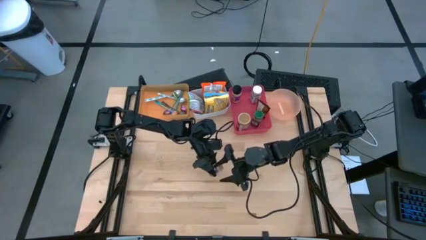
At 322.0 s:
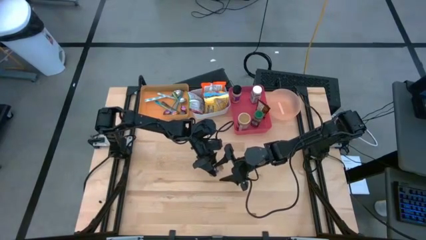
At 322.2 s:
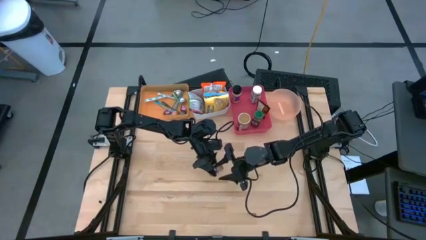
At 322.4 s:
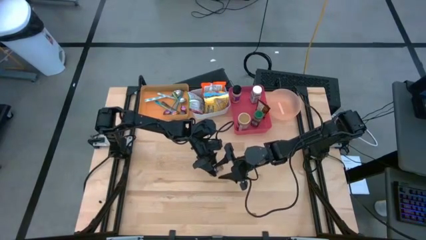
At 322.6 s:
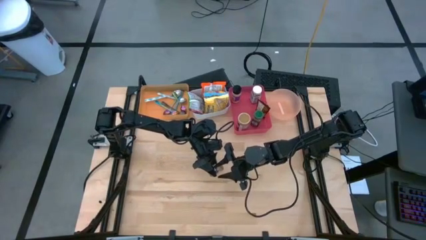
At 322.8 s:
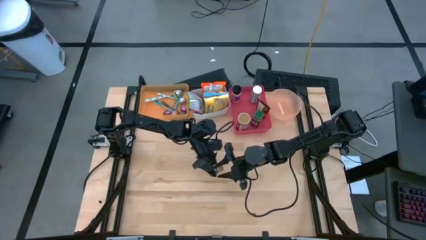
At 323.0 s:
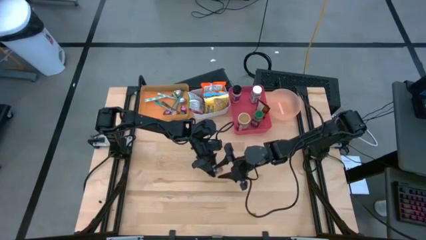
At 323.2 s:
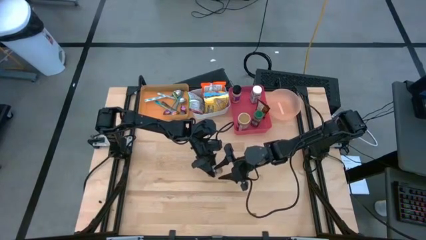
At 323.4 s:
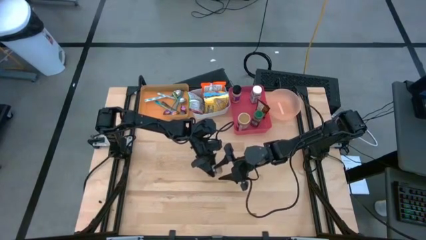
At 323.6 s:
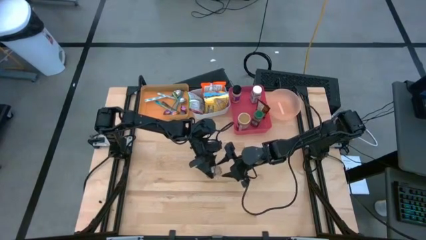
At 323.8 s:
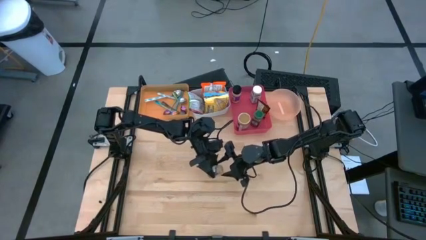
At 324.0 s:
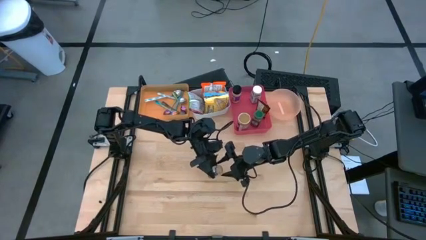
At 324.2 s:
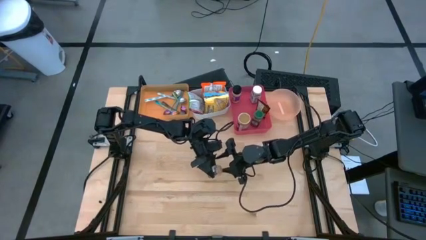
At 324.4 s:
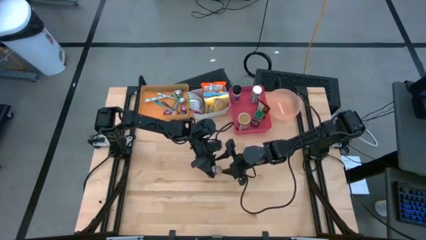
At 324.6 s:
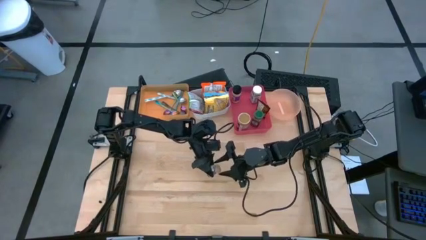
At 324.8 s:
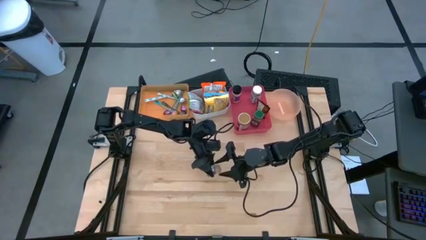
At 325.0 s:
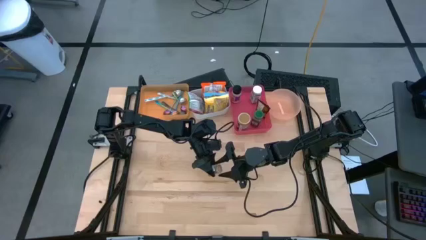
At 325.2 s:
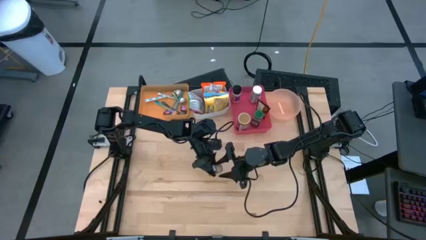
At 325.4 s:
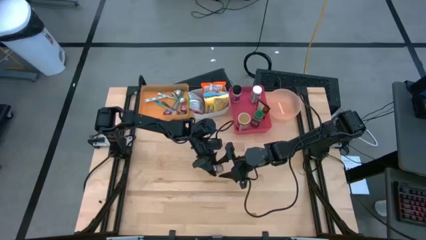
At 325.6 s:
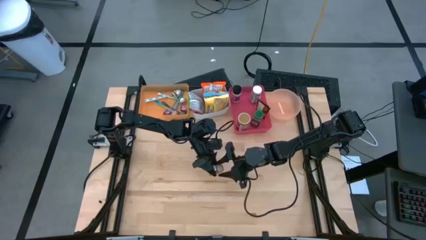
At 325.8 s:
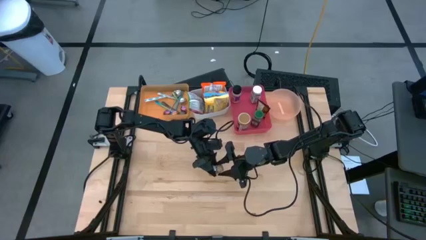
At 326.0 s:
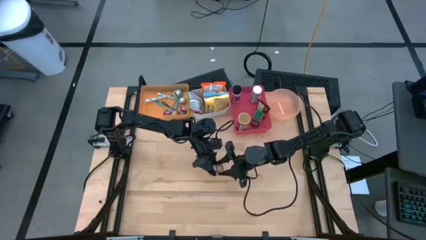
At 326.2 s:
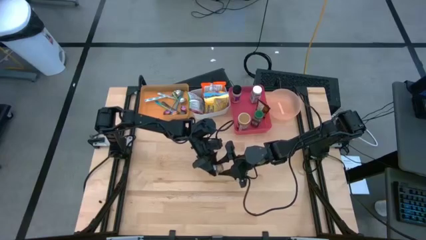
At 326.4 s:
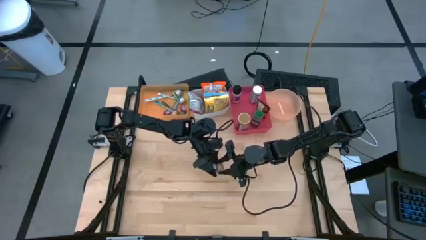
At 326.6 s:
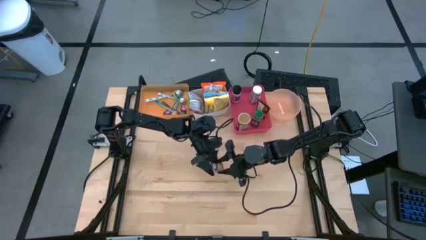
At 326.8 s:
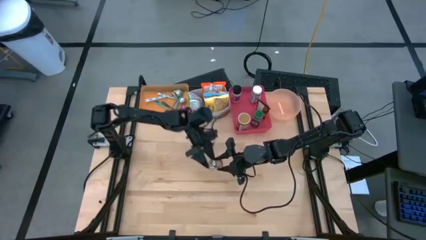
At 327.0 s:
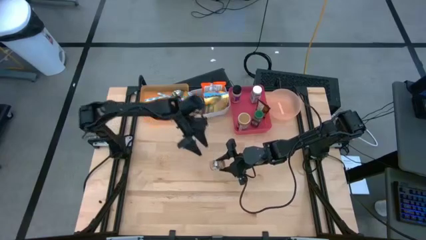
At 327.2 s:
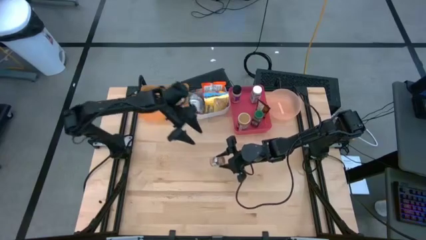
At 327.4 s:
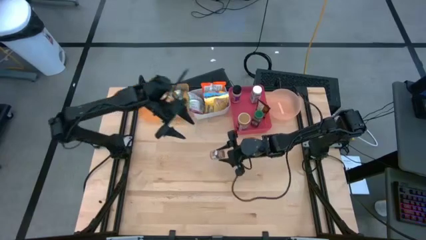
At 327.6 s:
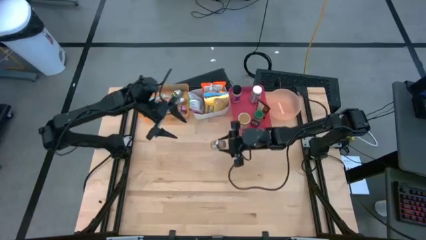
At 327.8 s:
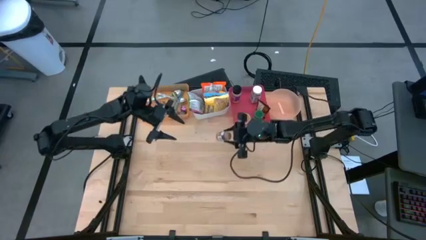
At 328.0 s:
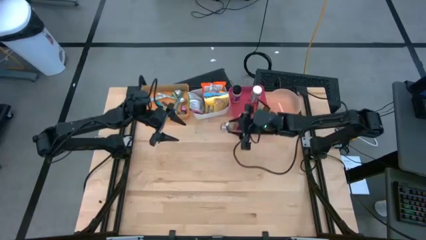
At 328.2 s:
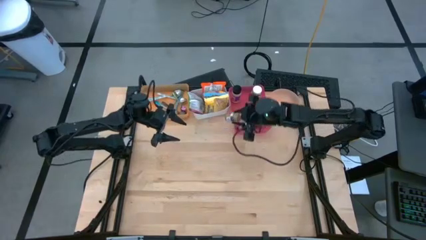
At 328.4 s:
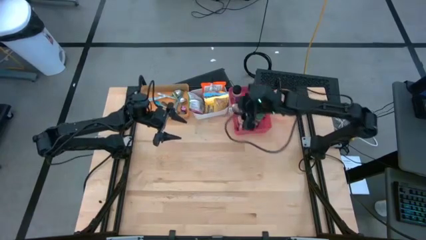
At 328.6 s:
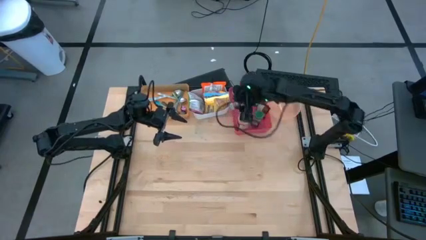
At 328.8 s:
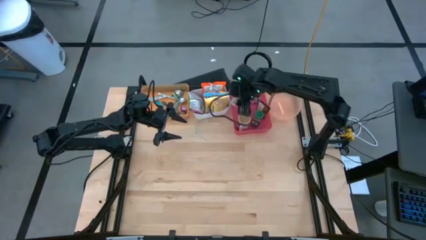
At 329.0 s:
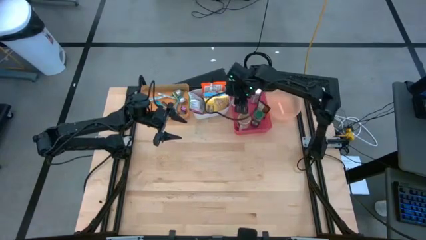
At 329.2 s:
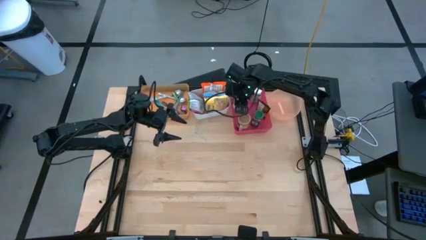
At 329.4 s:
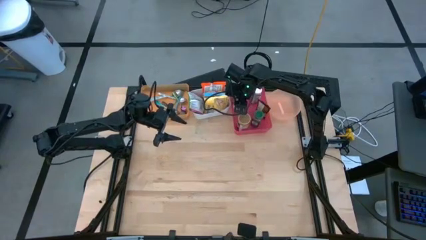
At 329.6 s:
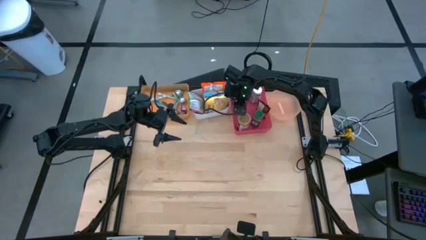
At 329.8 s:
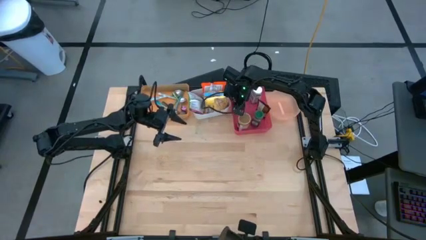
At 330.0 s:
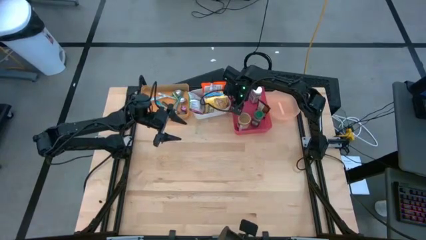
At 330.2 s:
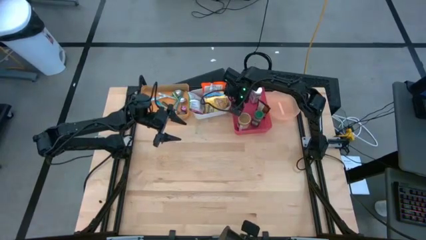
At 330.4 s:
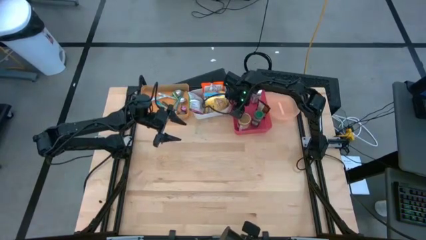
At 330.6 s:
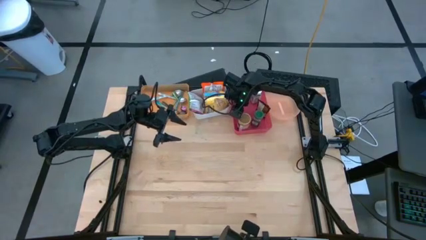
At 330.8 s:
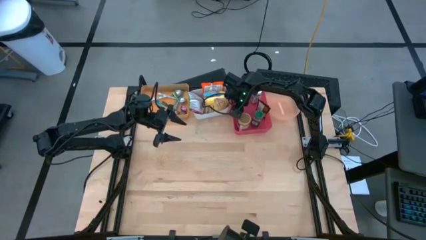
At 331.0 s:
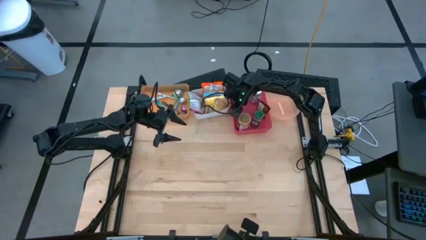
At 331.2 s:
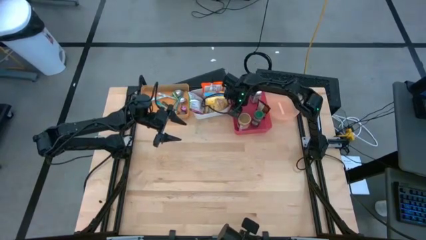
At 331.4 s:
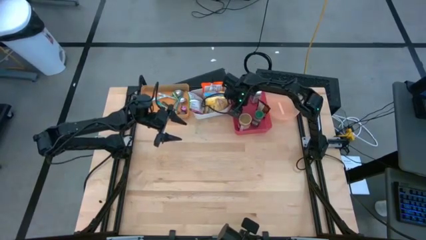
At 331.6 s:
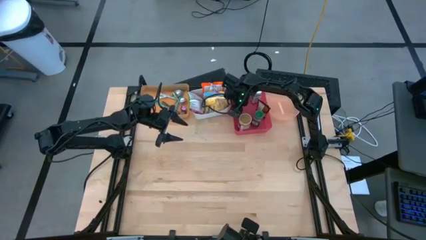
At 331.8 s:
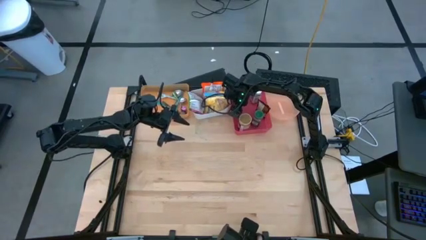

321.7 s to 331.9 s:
Task: Pick & Place Food Item
Put the brown seasoning bottle into the pink bin
